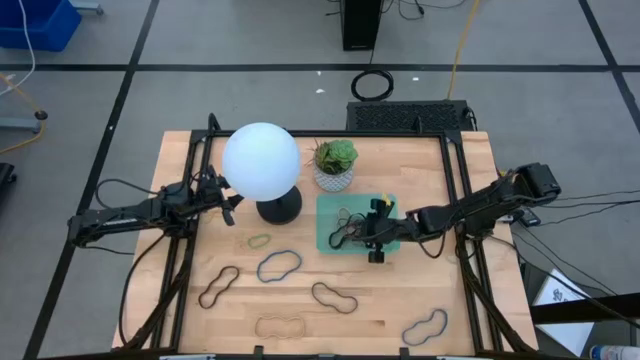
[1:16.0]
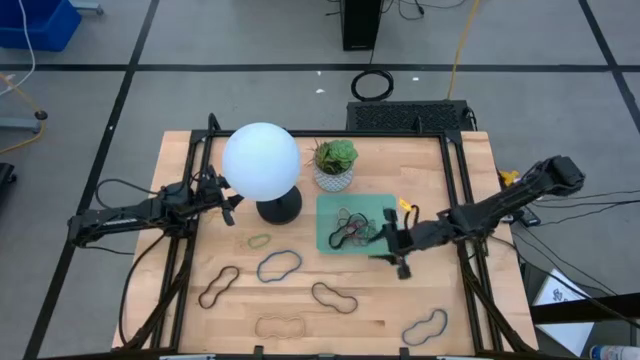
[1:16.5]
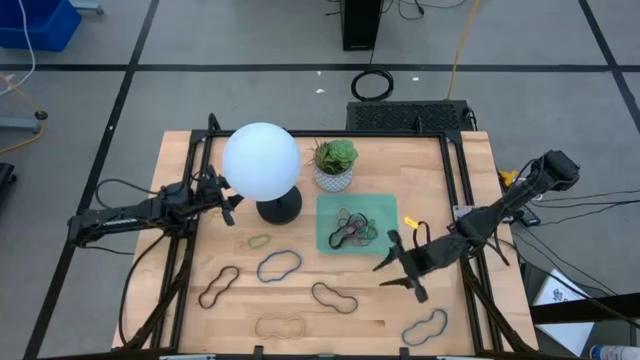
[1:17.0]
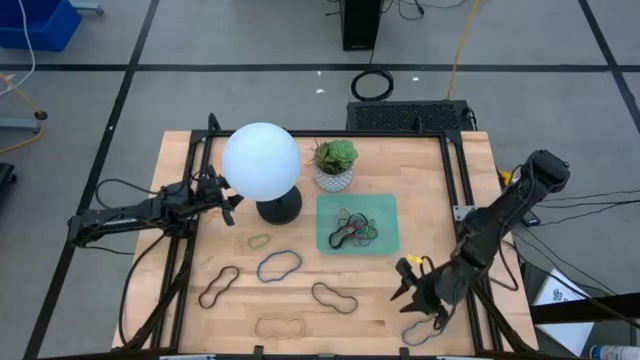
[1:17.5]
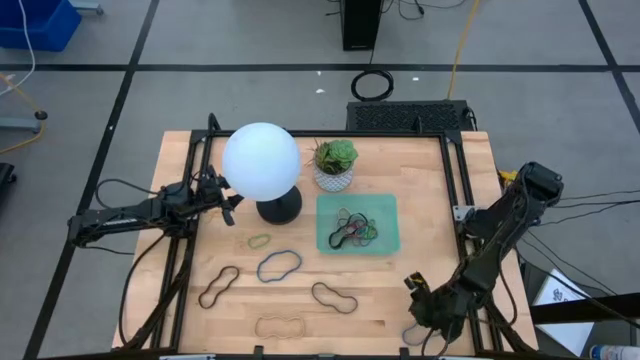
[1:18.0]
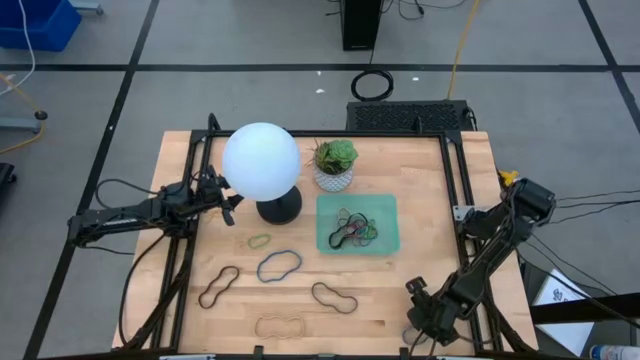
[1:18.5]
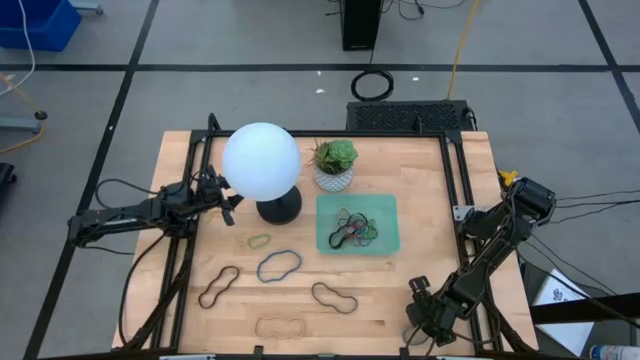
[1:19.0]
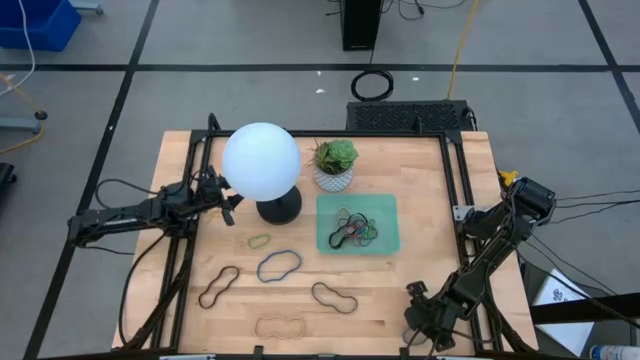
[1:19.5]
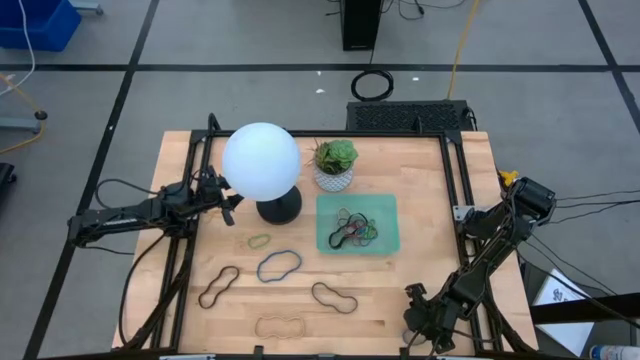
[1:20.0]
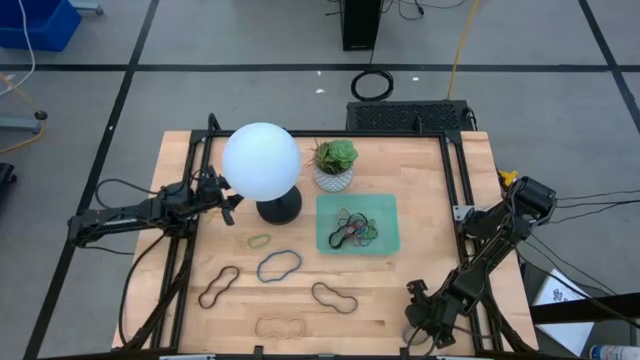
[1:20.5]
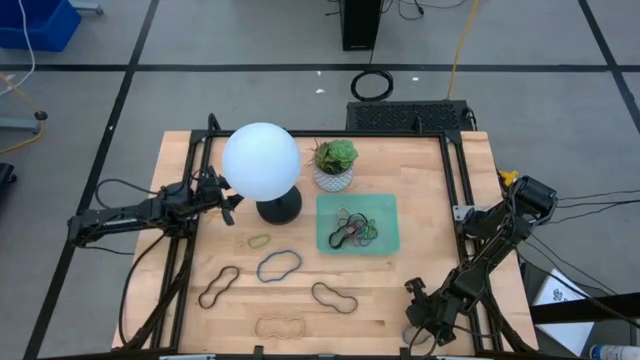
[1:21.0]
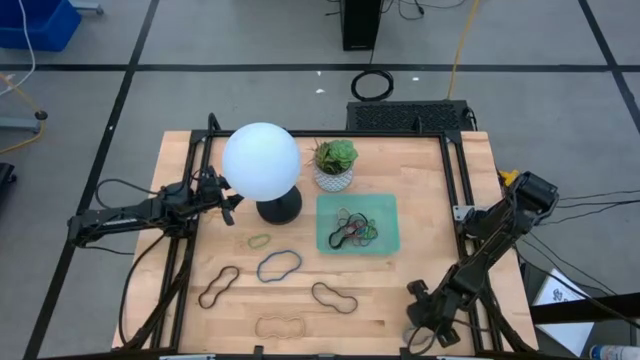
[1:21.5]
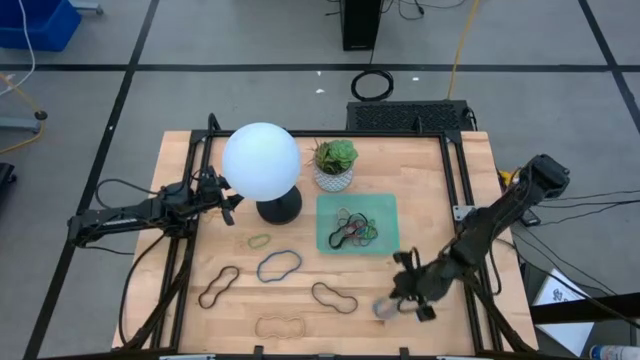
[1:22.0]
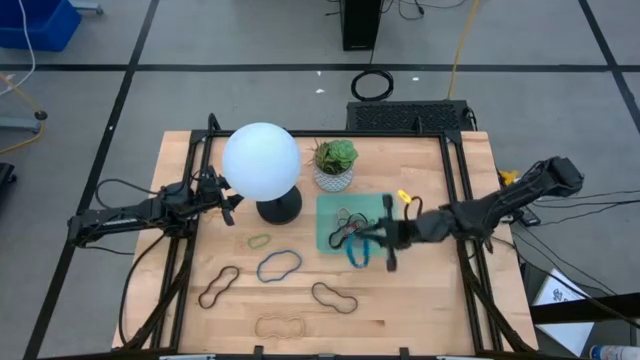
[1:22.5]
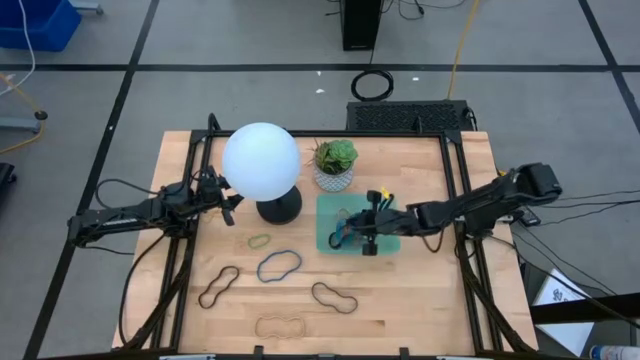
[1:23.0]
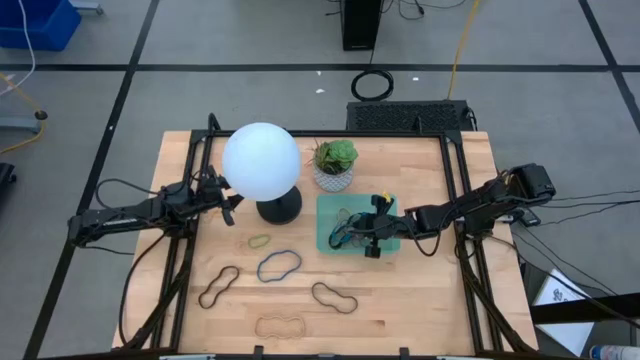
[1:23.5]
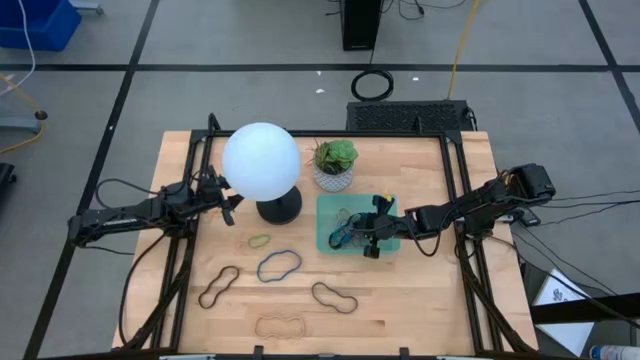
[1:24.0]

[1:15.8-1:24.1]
Task: Pick and place rubber bands into bin
Put the bottom blue rubber band into the blue bin

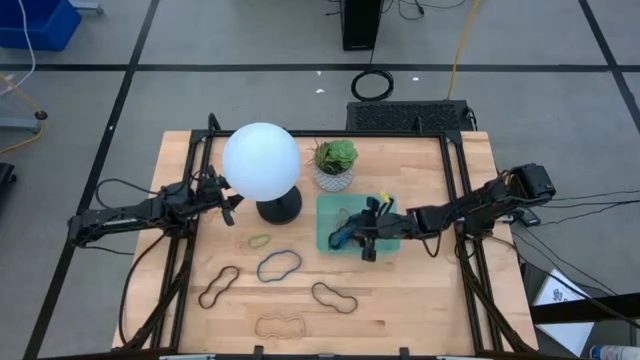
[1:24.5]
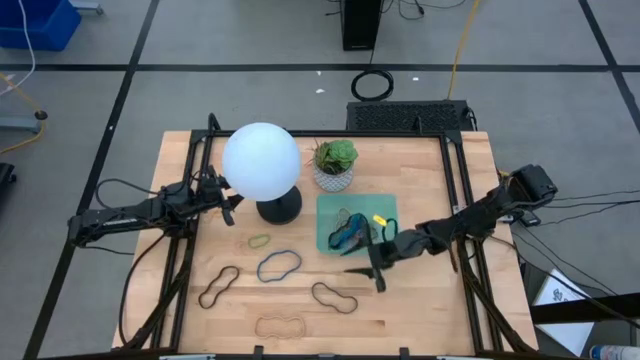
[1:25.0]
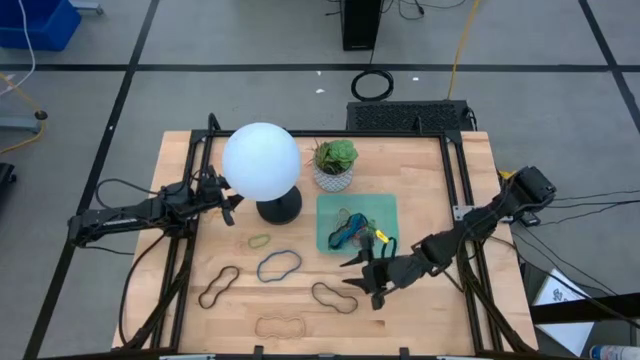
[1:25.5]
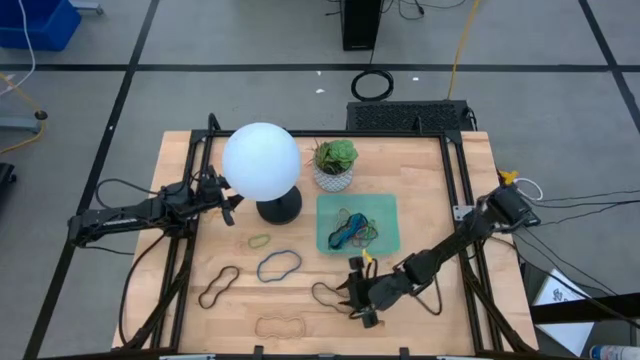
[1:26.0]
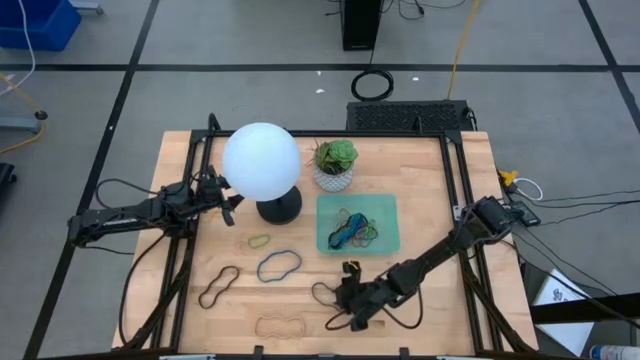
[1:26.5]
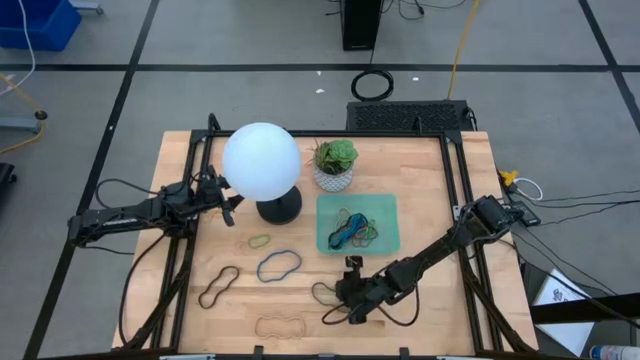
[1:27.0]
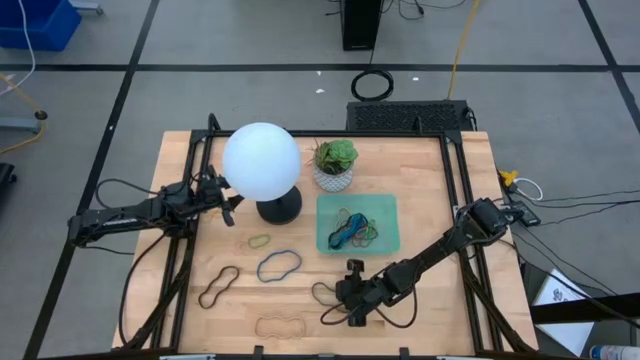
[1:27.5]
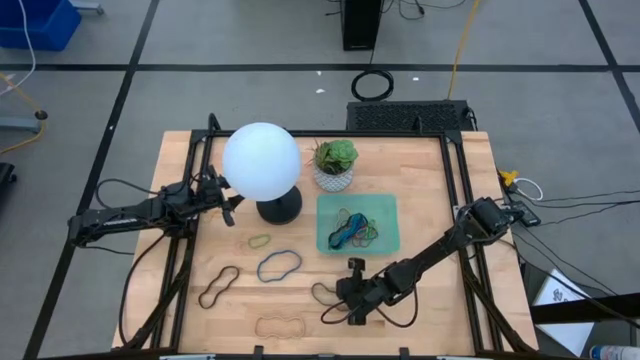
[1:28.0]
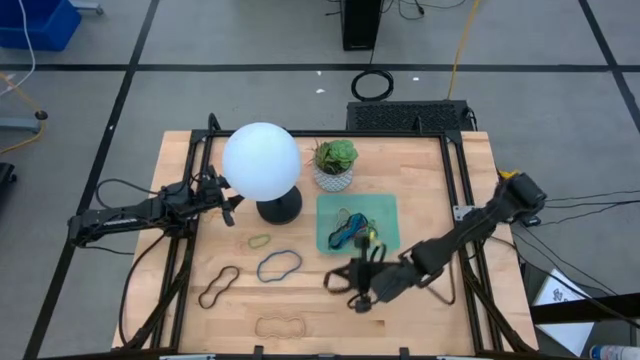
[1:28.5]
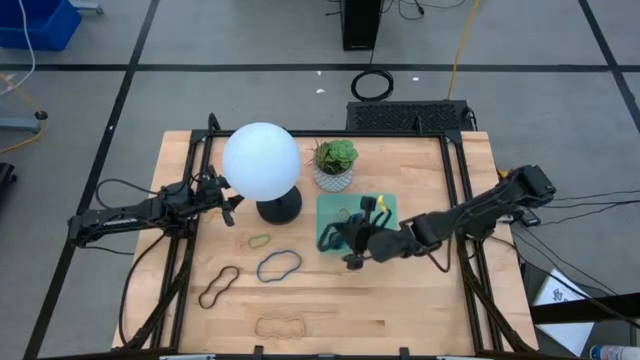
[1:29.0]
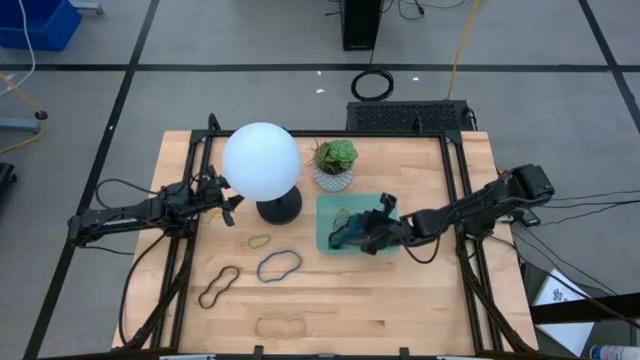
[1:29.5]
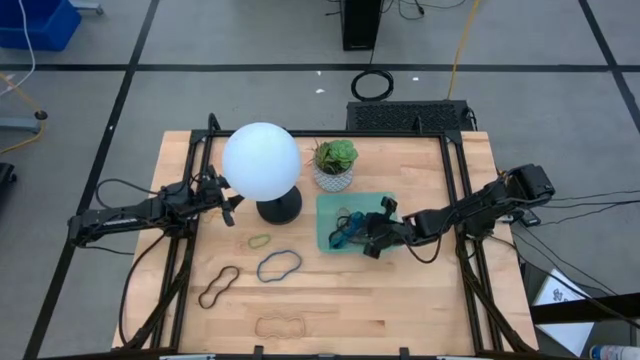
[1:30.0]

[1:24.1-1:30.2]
Put the right black rubber band into the blue bin

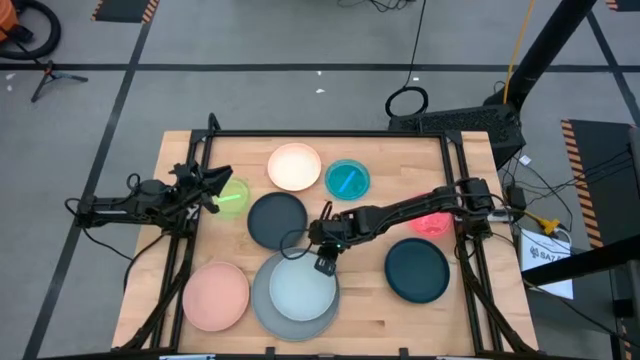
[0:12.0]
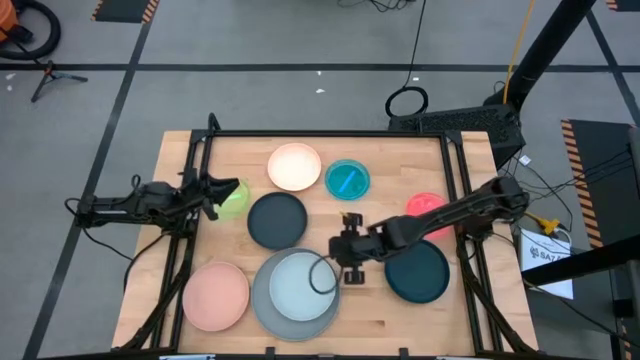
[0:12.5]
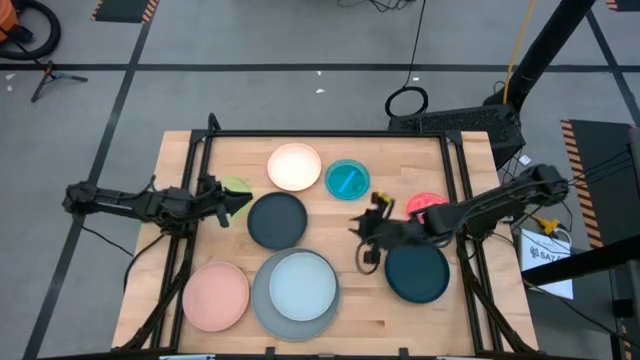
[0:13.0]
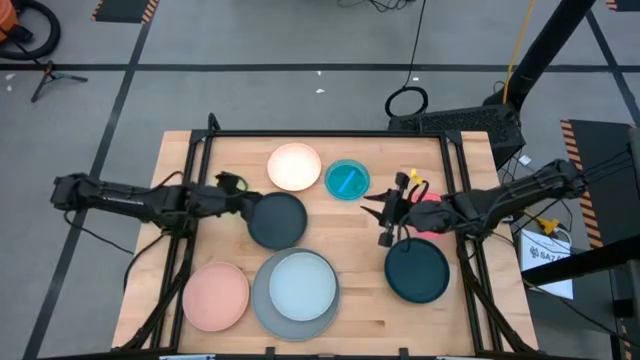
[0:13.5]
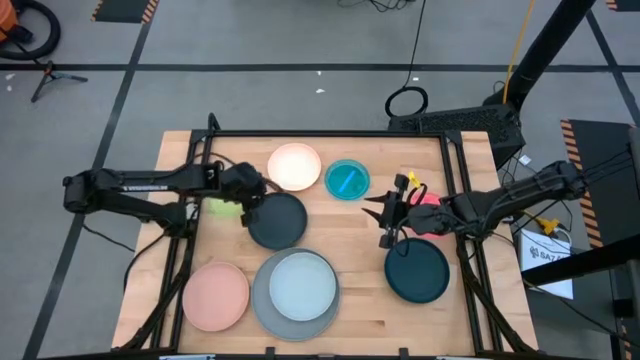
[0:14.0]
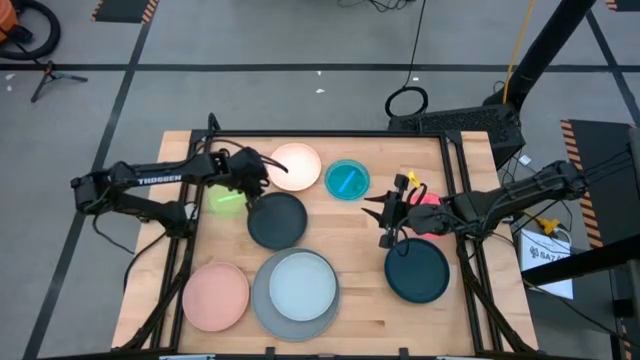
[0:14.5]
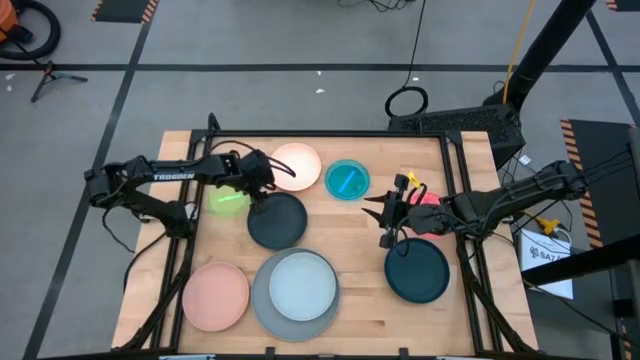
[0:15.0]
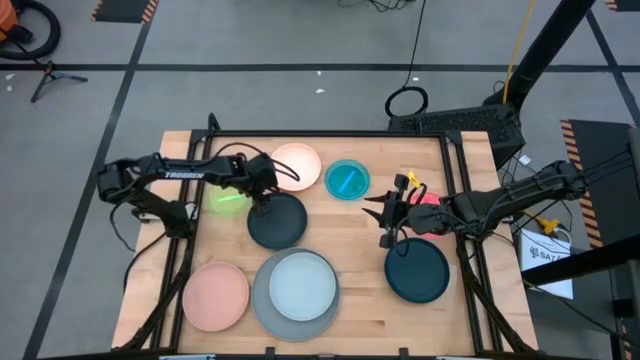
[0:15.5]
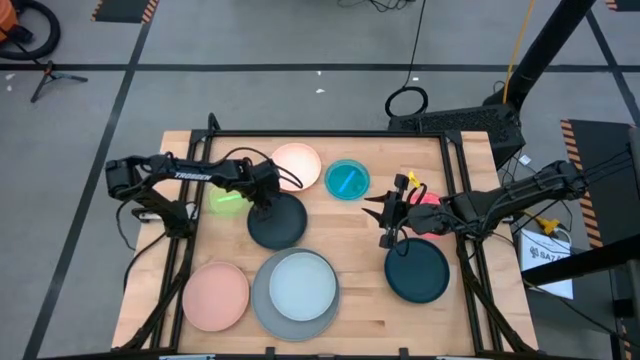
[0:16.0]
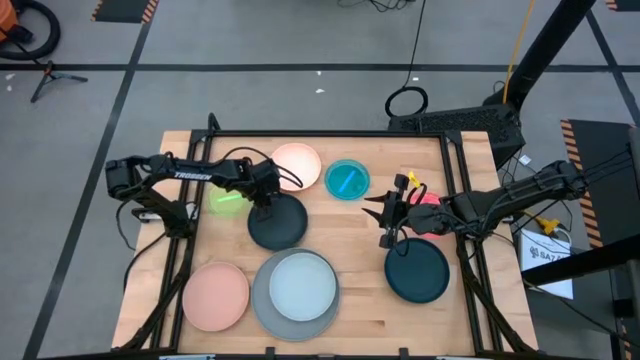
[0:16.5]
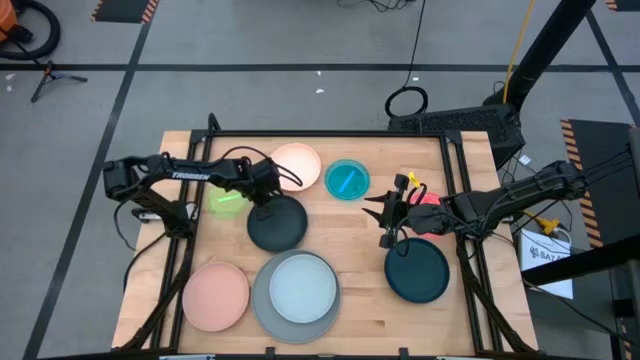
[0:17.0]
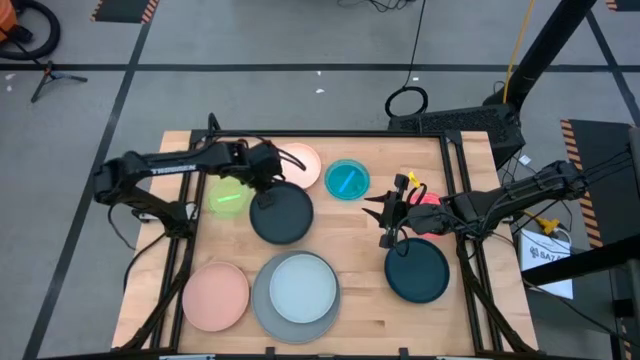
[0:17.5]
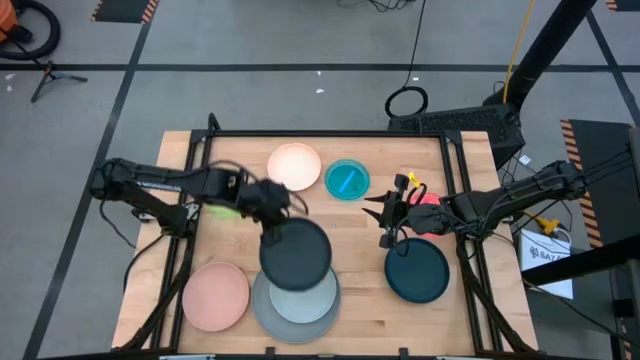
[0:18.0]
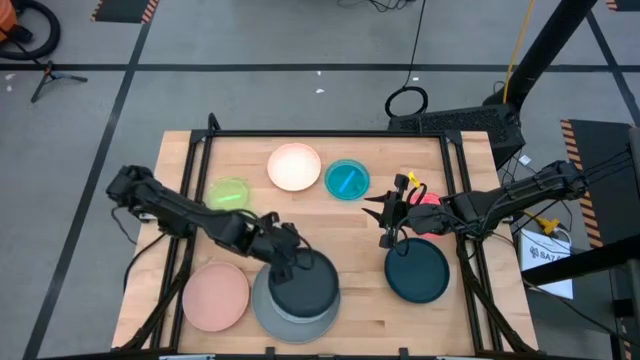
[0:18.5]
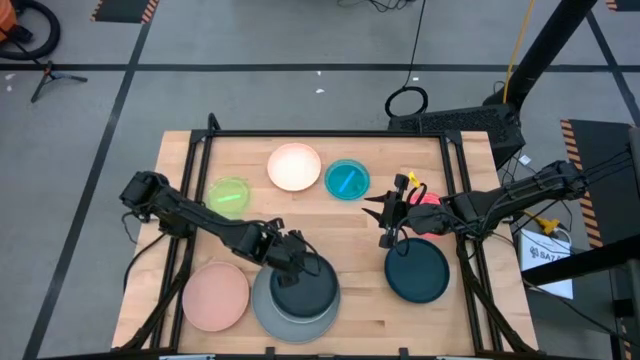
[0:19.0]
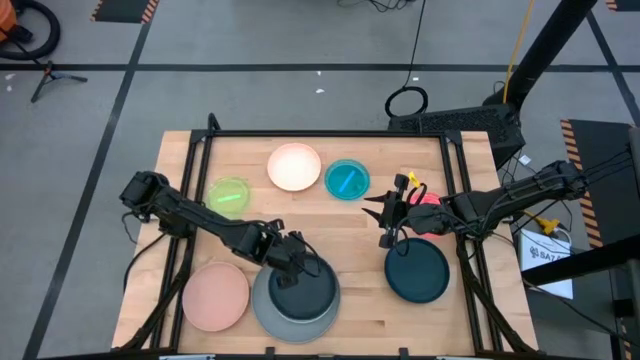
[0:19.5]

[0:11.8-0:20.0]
Task: Stack plastic plates
Stack the left black plate on top of the white plate
